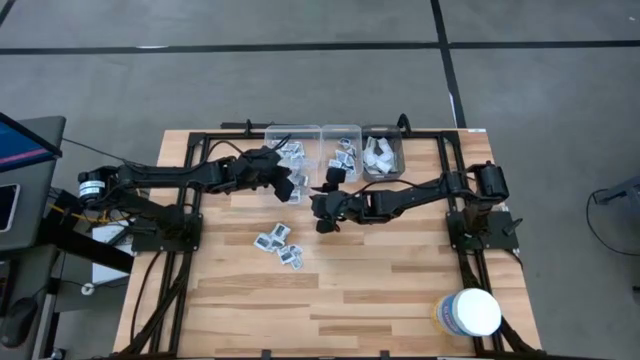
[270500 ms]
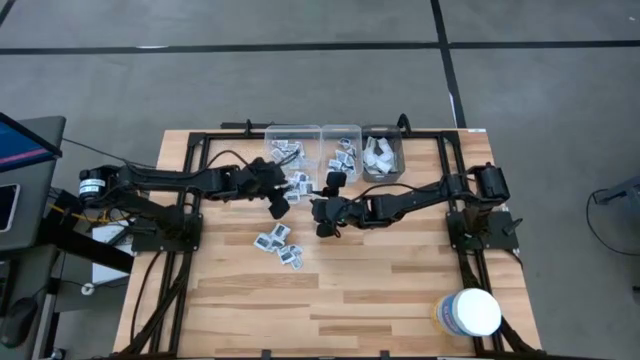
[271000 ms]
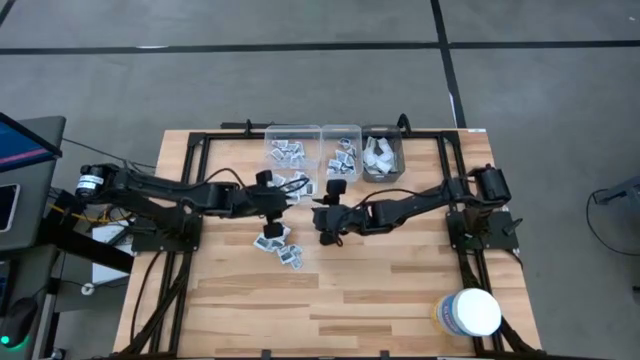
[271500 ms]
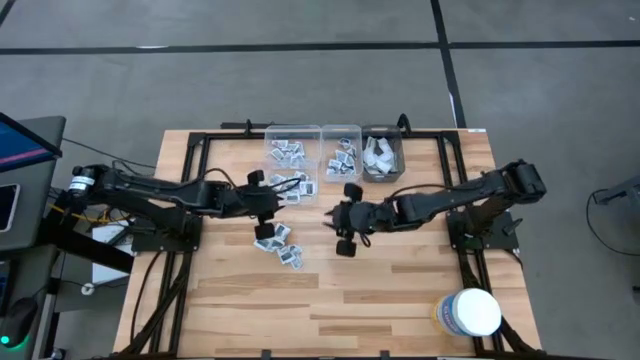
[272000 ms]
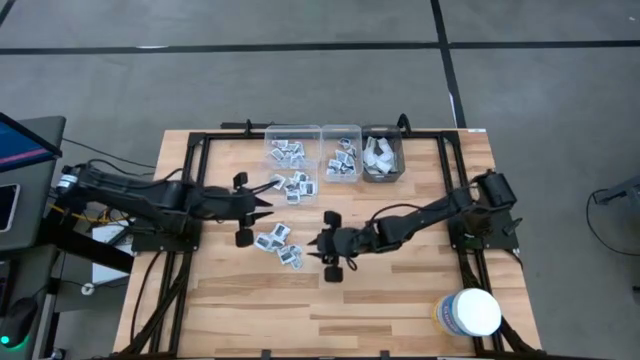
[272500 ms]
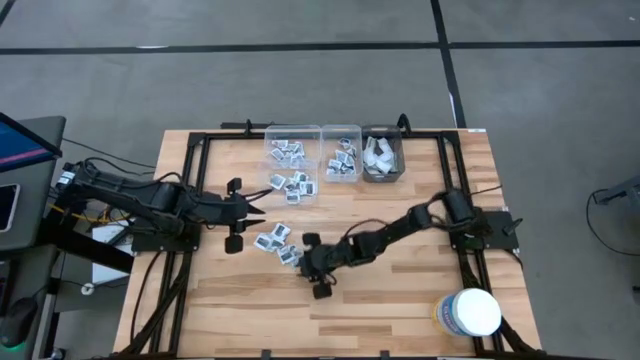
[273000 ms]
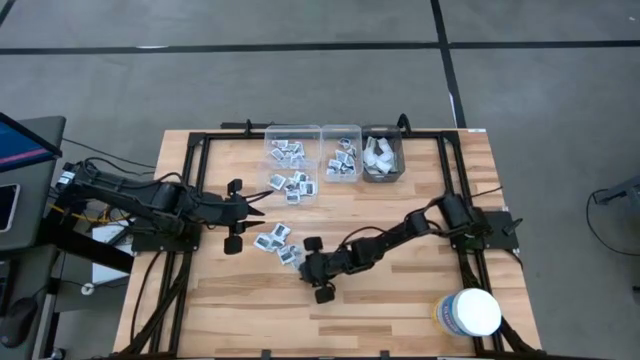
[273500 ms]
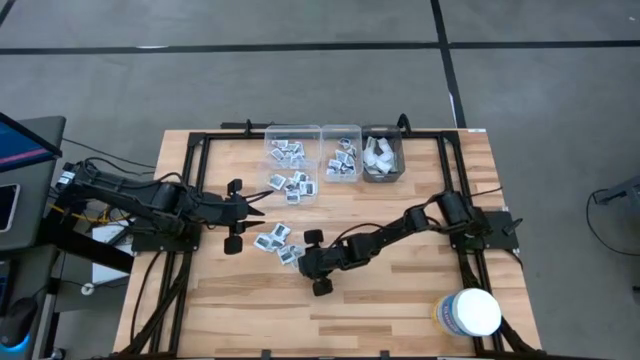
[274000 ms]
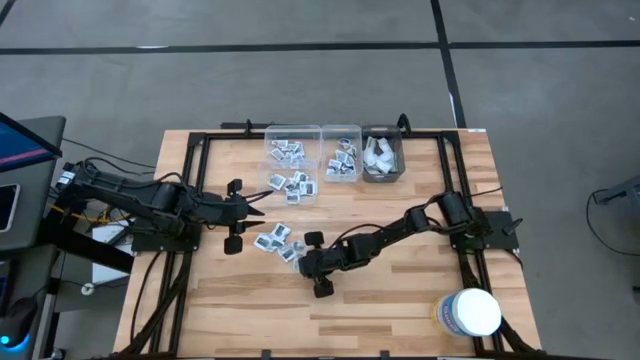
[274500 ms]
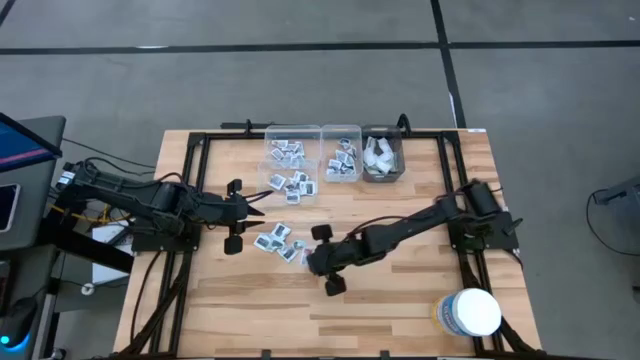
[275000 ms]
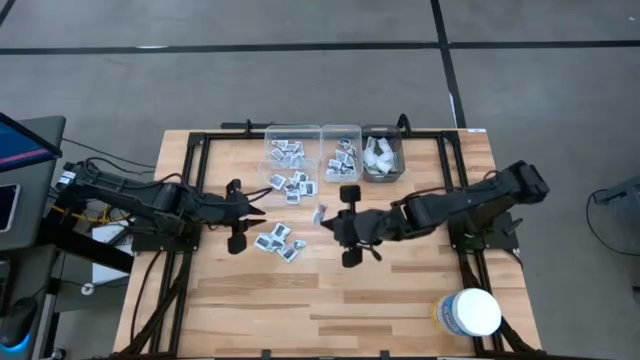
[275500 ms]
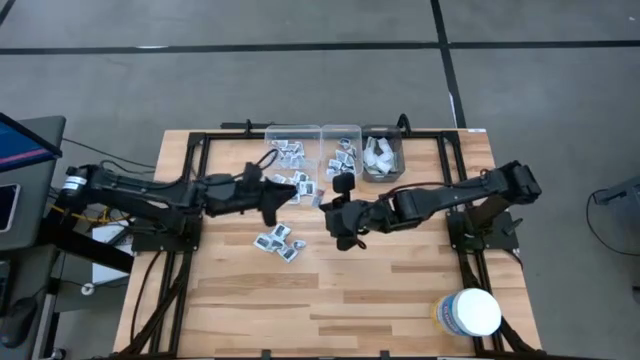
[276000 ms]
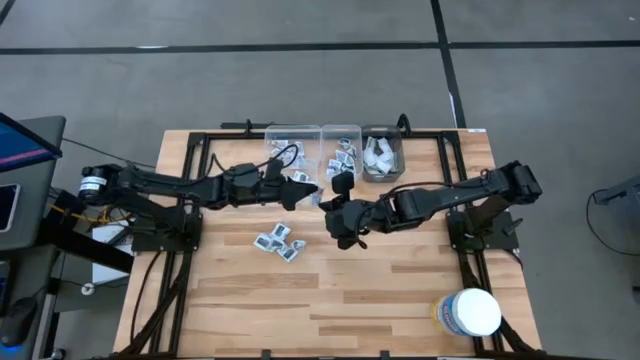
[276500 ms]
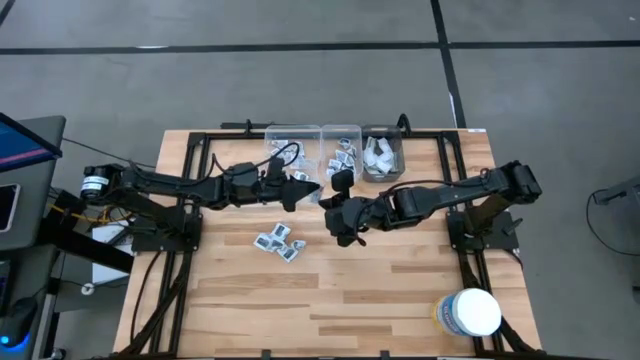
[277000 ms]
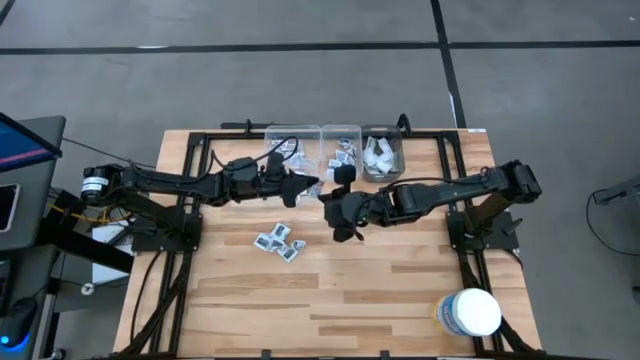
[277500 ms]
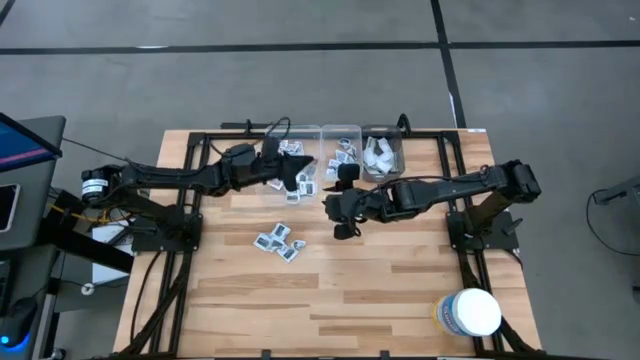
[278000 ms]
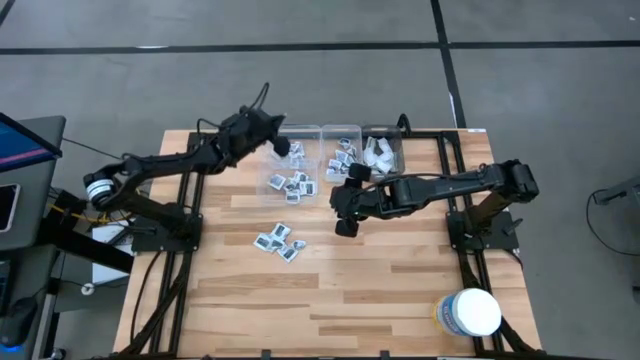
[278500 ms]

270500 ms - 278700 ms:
Task: Pick & Place First Aid Supplies
Put the ointment pack into the top left transparent bin

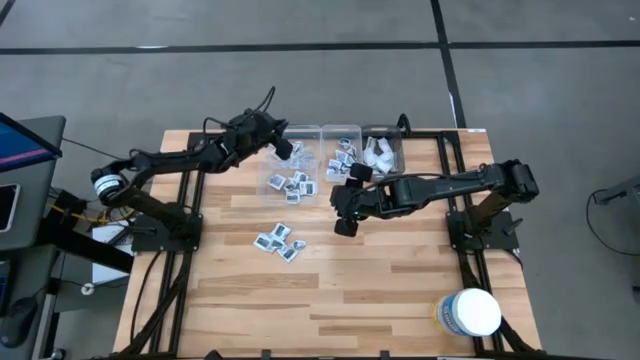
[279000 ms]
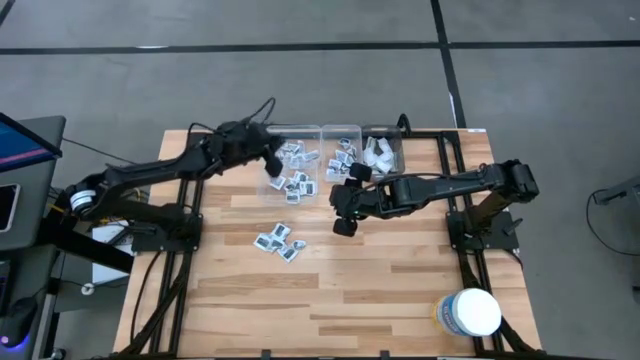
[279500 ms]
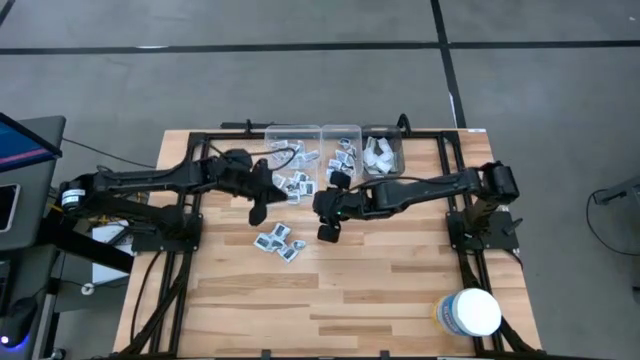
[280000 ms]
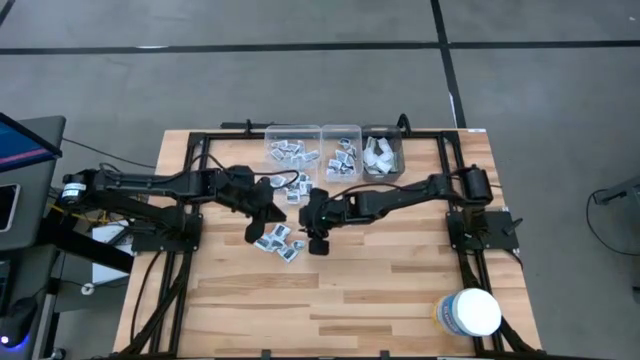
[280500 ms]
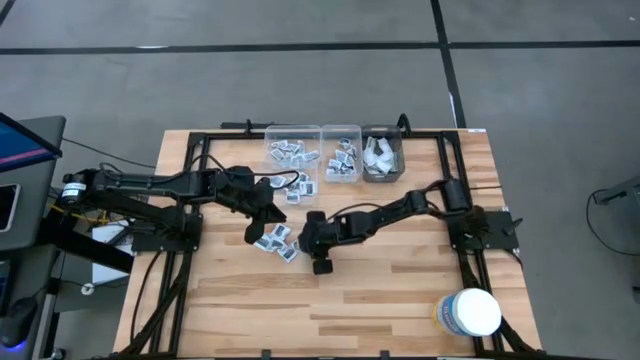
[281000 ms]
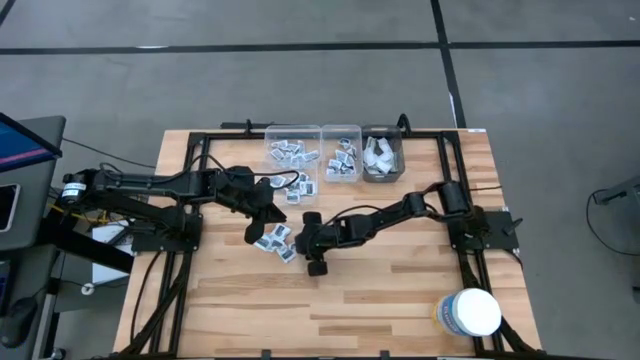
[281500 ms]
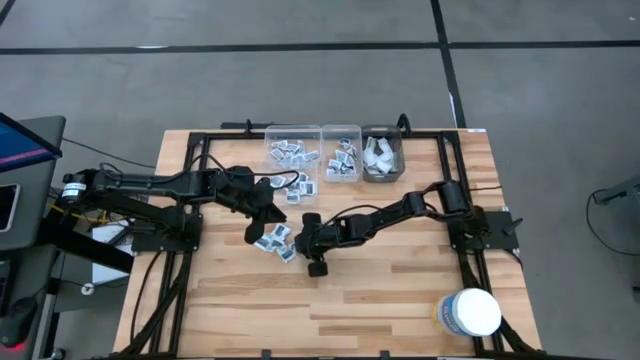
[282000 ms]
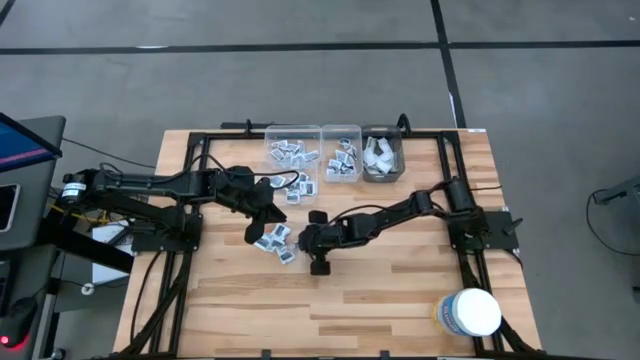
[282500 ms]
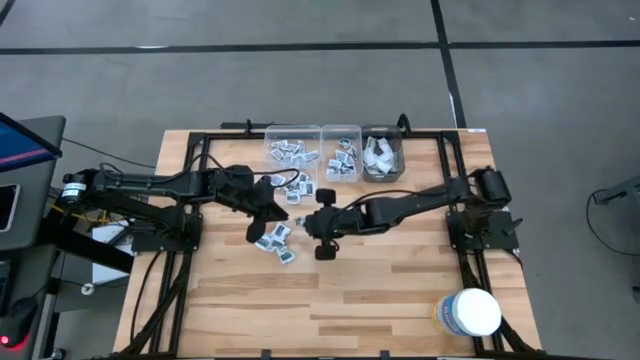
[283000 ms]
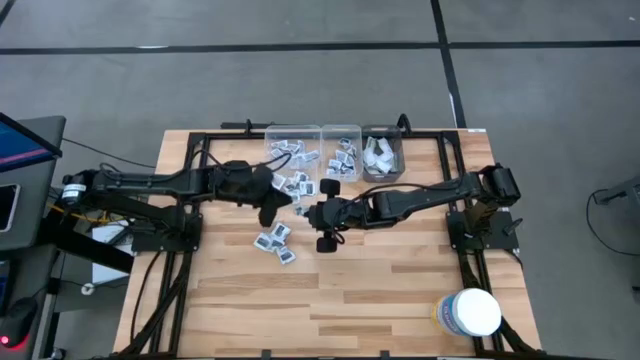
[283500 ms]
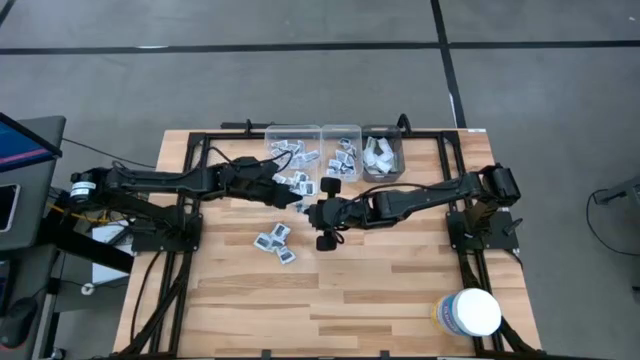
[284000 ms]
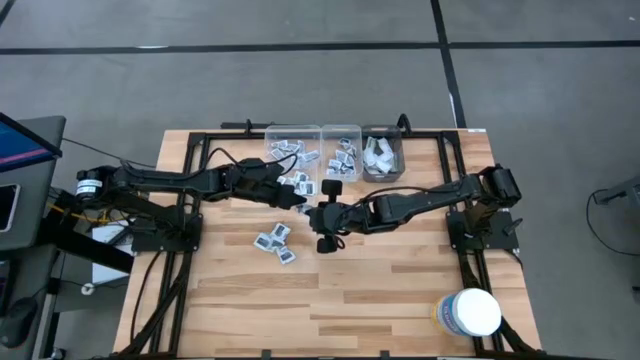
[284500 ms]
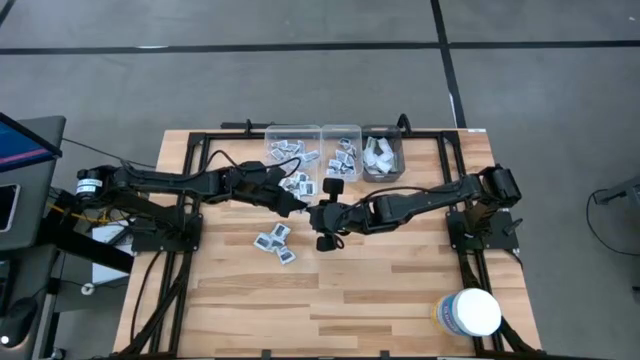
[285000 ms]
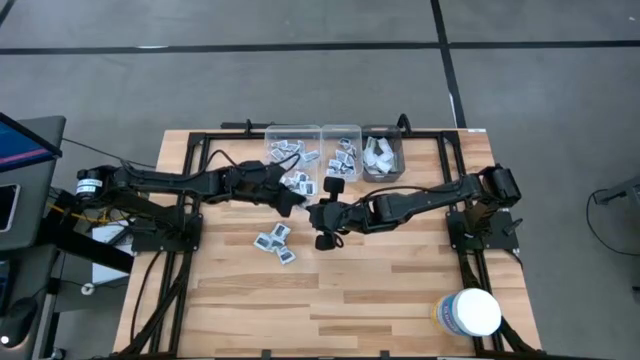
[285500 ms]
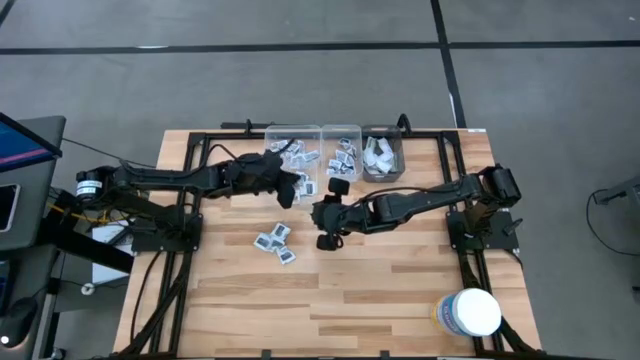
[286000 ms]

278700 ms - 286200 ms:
Put the towelette pack into the bottom transparent bin

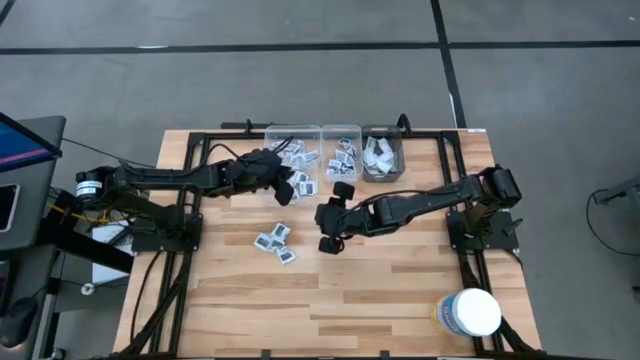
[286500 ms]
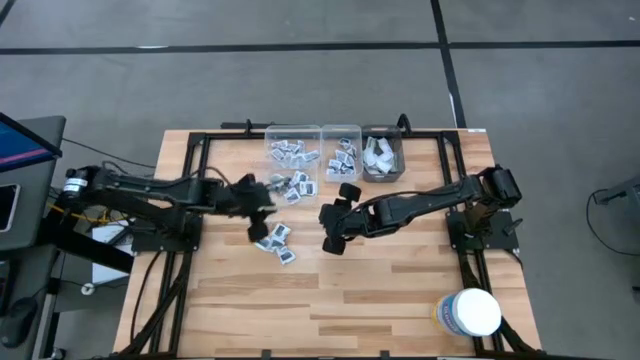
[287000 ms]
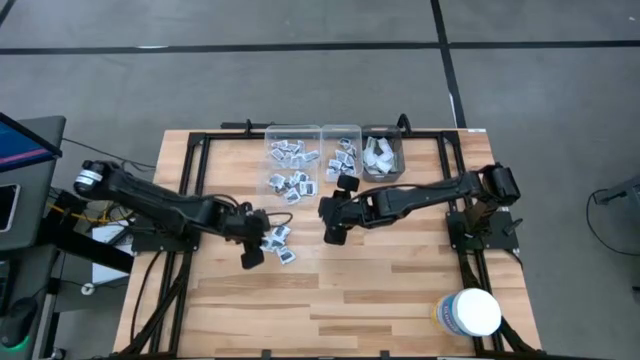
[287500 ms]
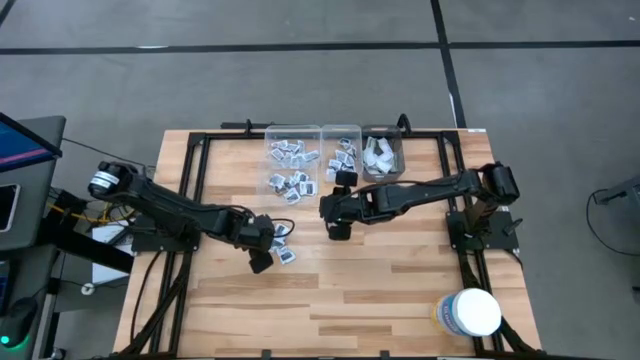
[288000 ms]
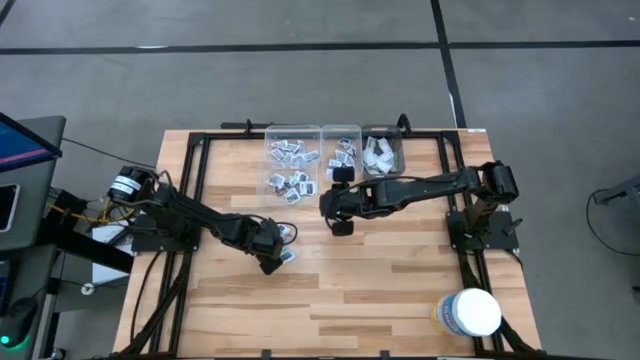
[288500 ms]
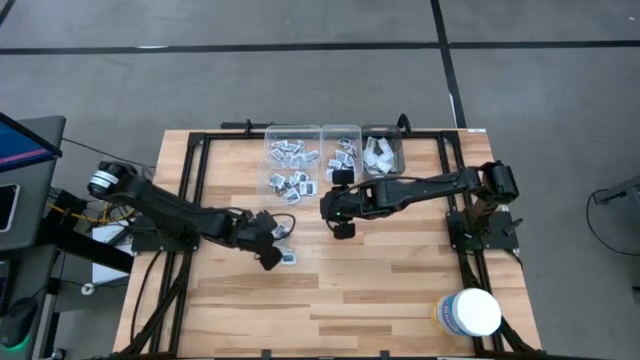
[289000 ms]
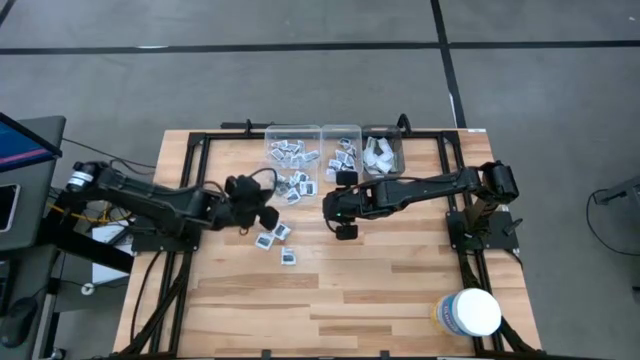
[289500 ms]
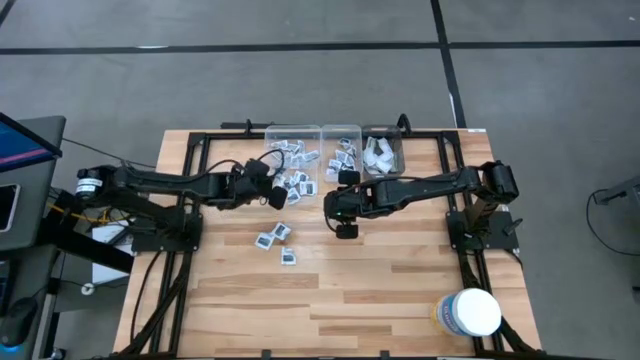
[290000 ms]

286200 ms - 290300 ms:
Put the towelette pack into the bottom transparent bin

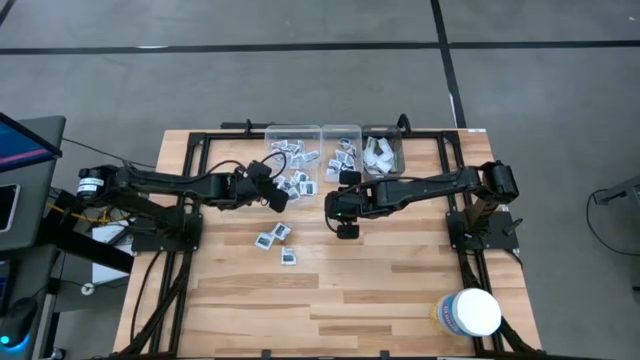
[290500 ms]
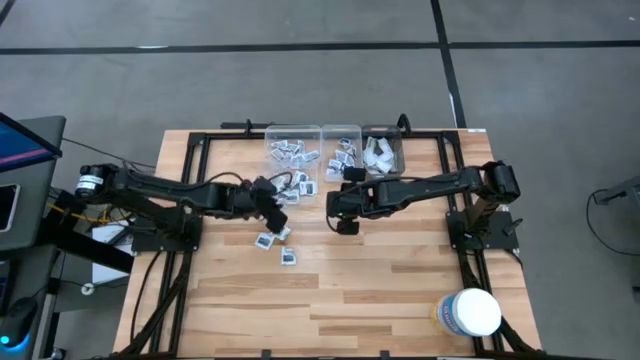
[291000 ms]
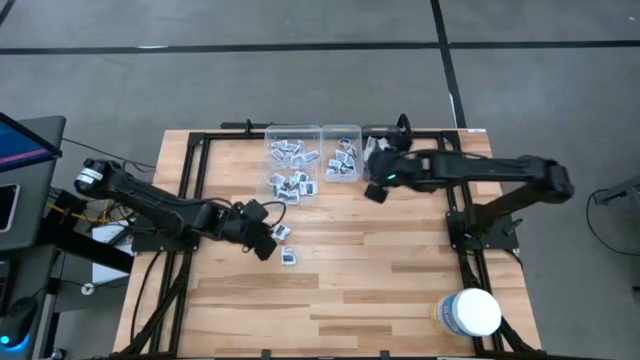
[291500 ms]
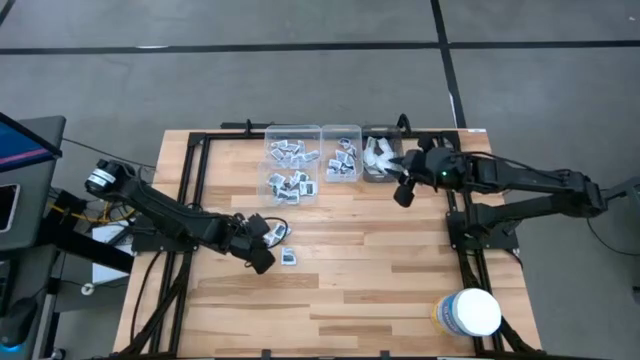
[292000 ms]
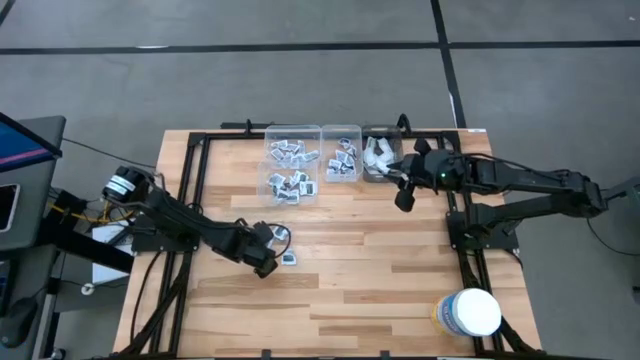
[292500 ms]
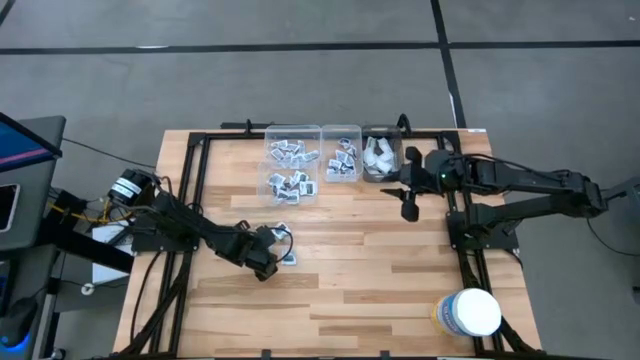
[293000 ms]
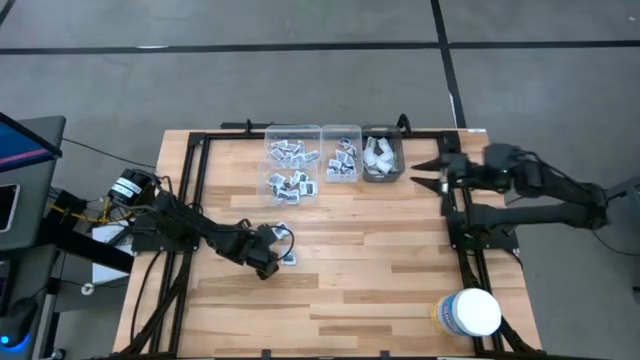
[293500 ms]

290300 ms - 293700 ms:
Put the towelette pack into the bottom transparent bin
